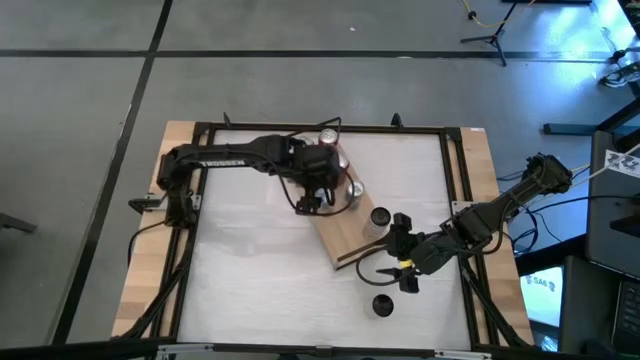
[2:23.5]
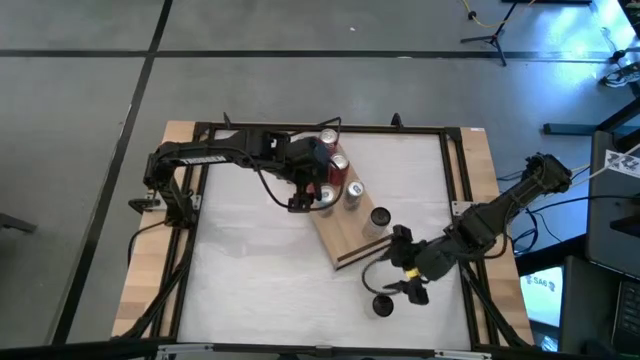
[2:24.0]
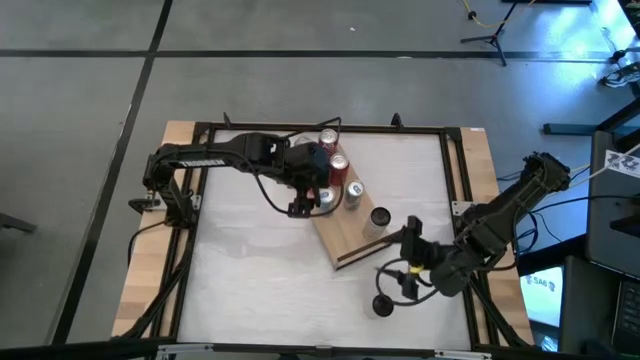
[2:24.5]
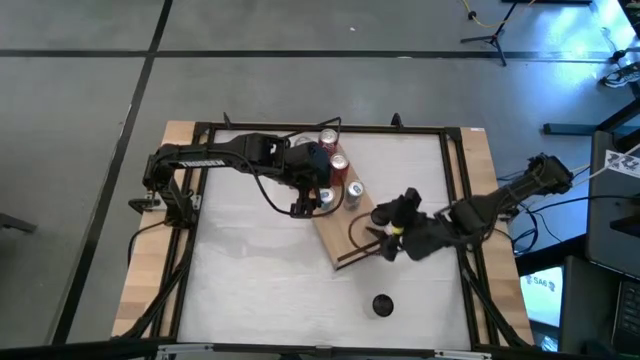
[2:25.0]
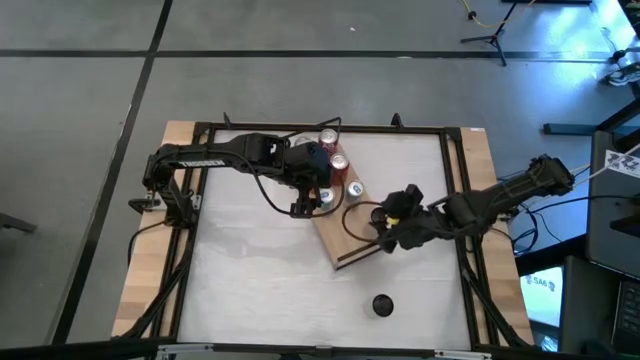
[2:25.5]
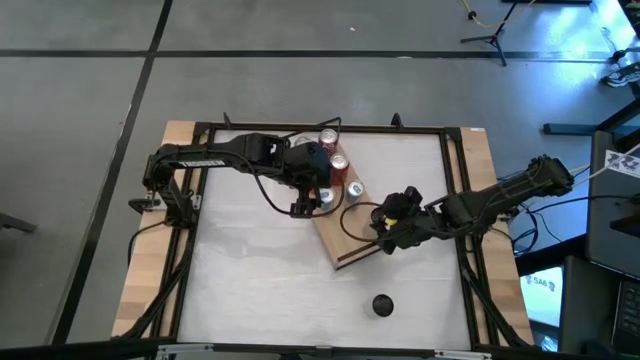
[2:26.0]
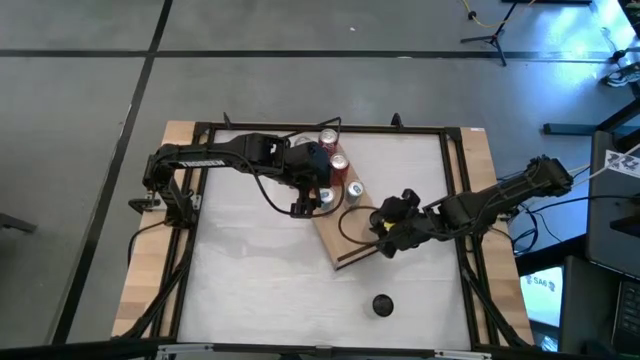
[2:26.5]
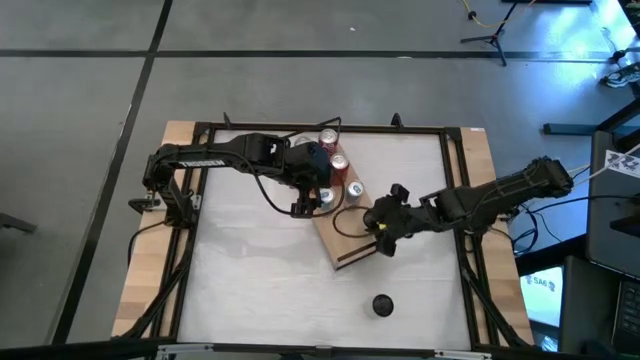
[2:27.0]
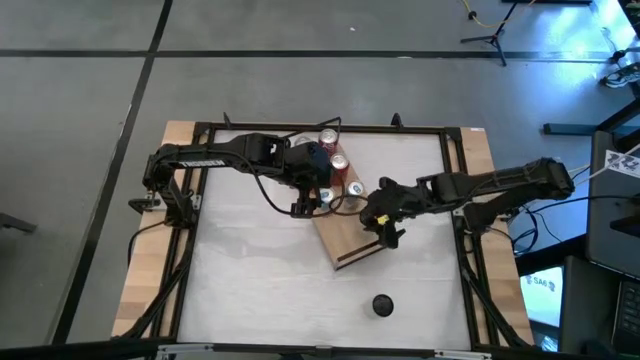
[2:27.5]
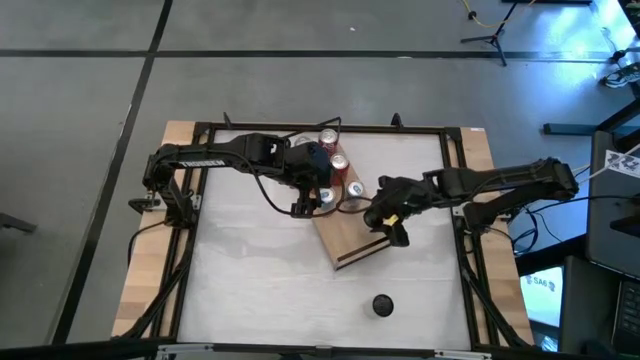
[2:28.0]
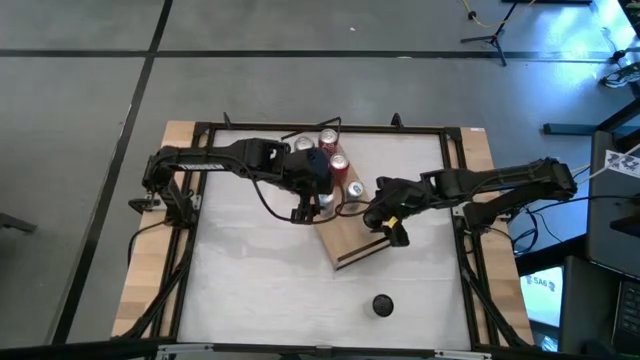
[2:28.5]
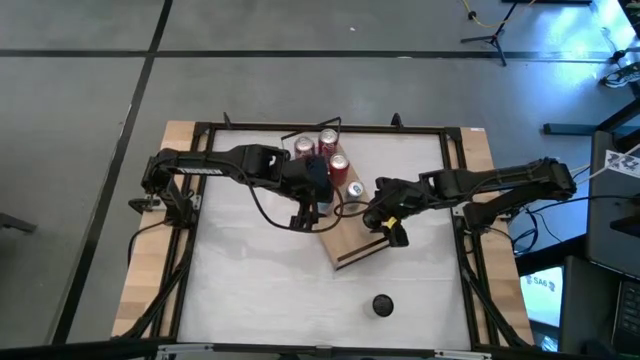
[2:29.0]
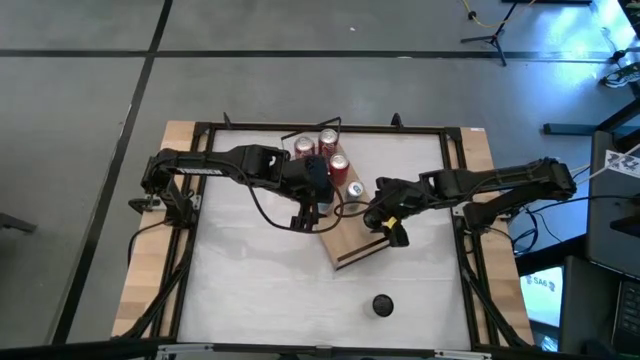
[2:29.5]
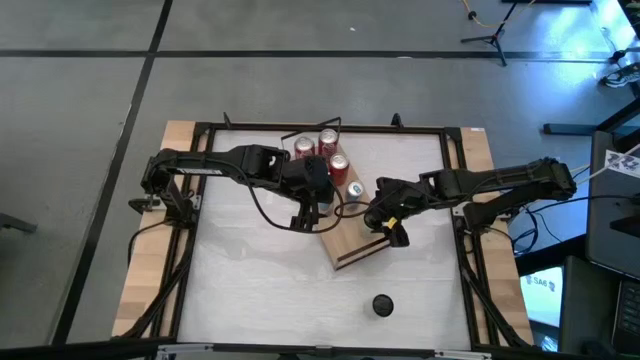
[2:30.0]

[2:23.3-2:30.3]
Task: Place canned beverage on shelf
Adjust the white yellow soda can on the shelf

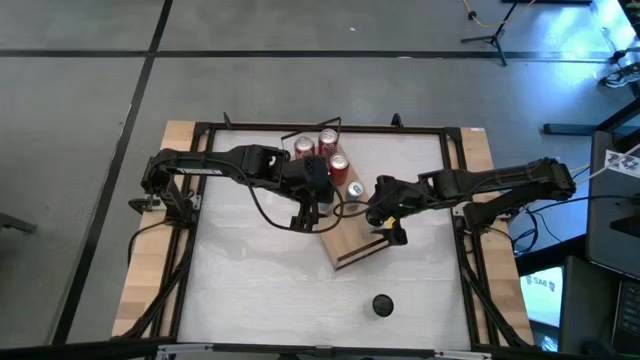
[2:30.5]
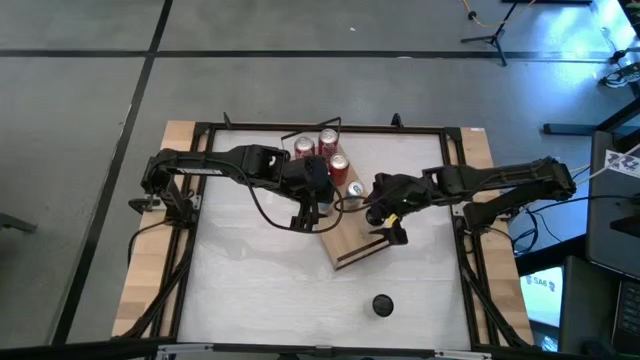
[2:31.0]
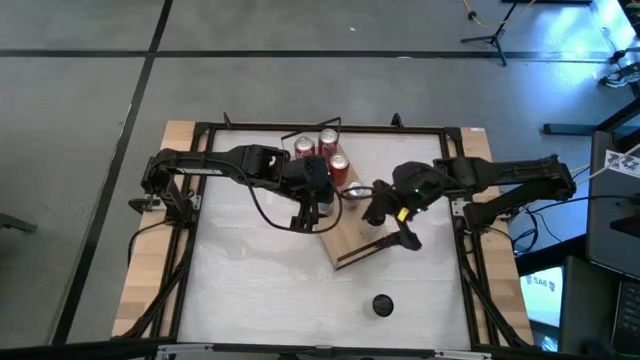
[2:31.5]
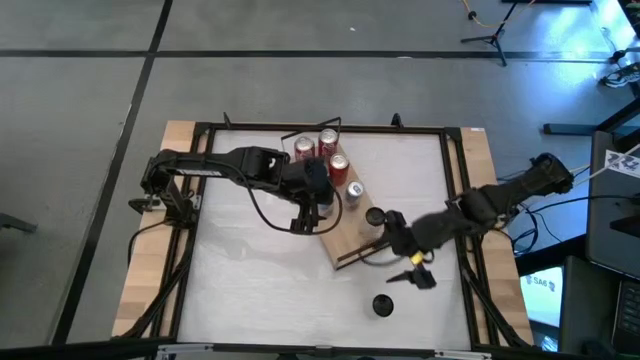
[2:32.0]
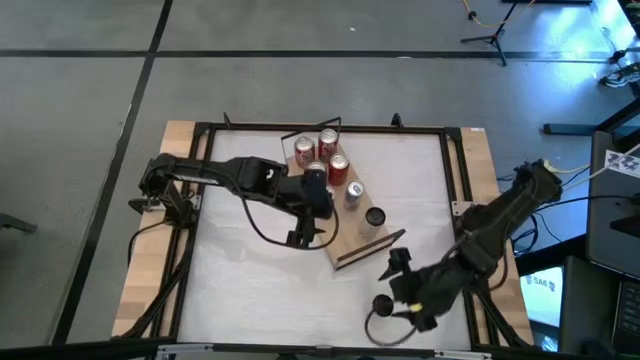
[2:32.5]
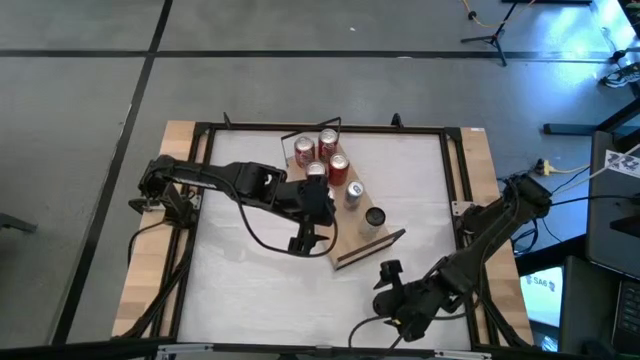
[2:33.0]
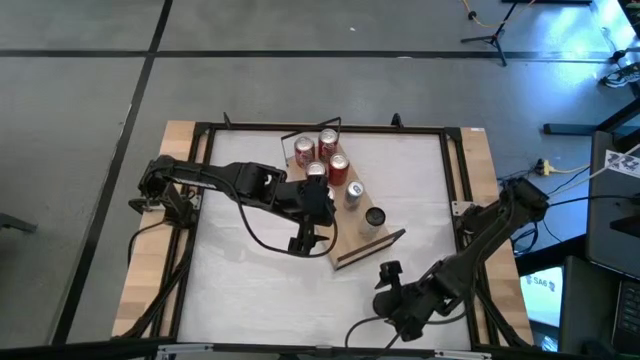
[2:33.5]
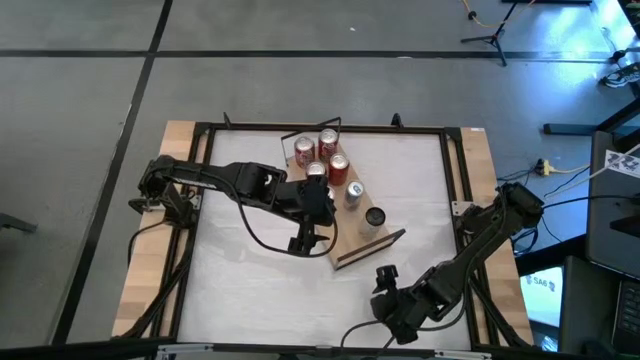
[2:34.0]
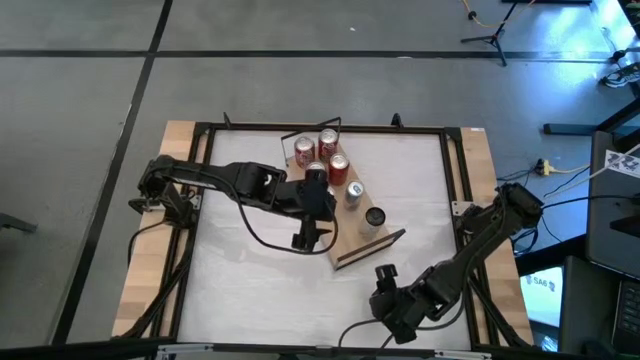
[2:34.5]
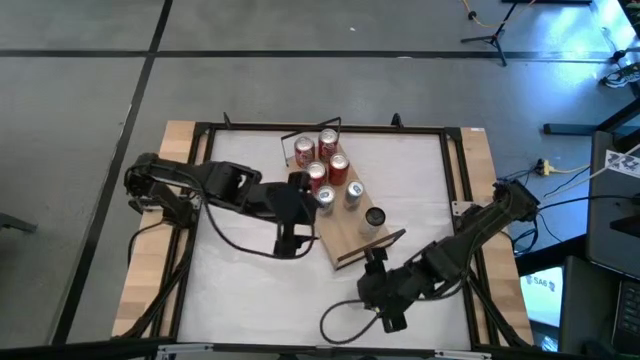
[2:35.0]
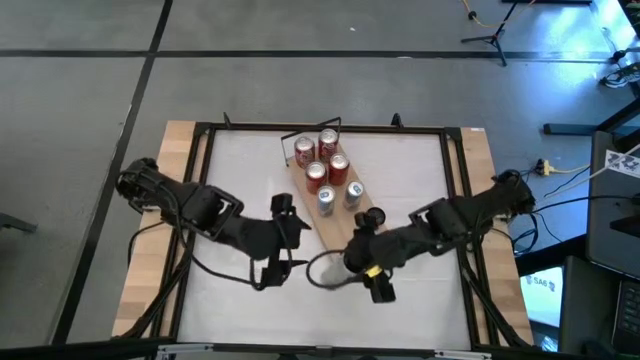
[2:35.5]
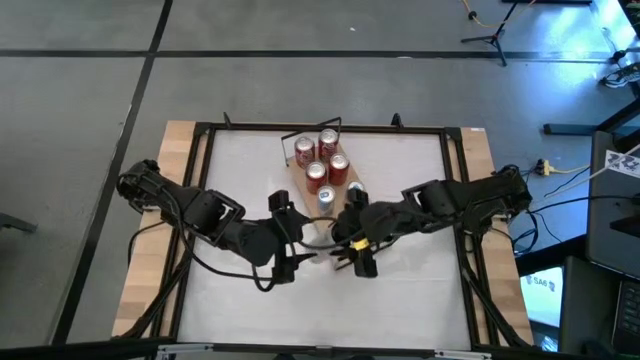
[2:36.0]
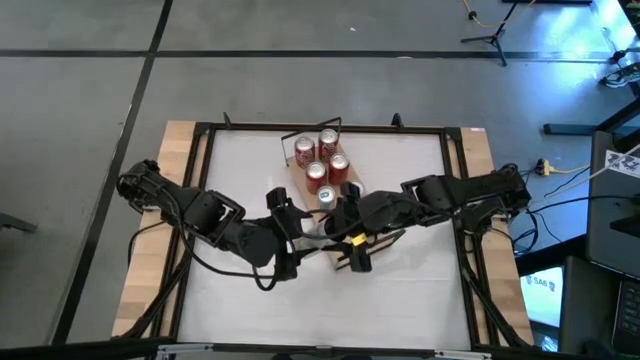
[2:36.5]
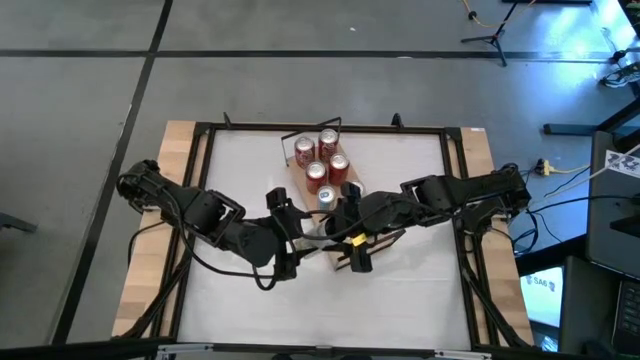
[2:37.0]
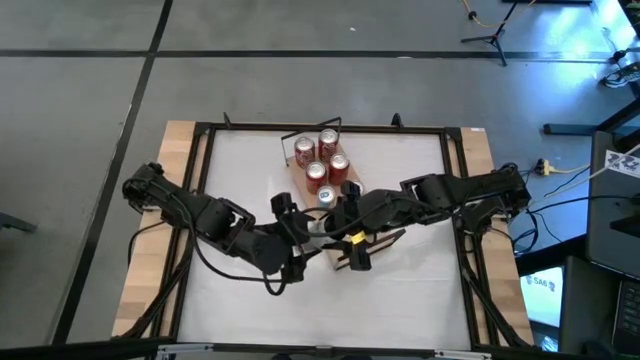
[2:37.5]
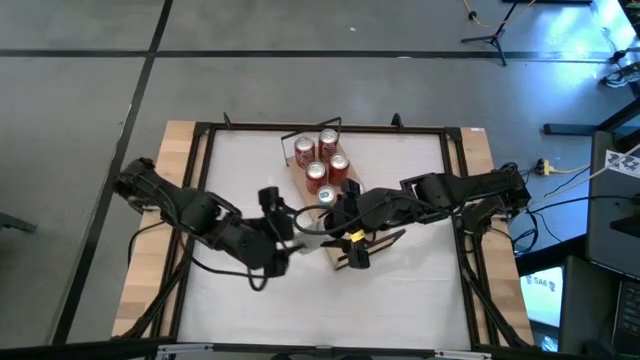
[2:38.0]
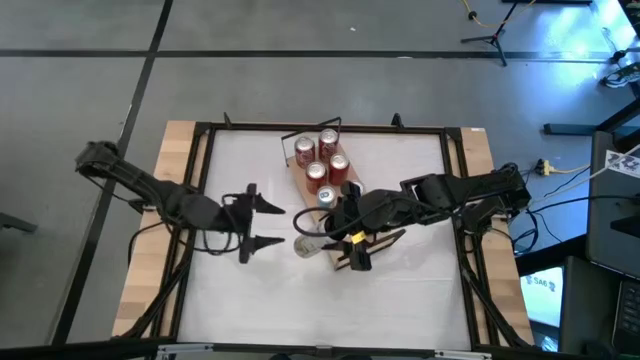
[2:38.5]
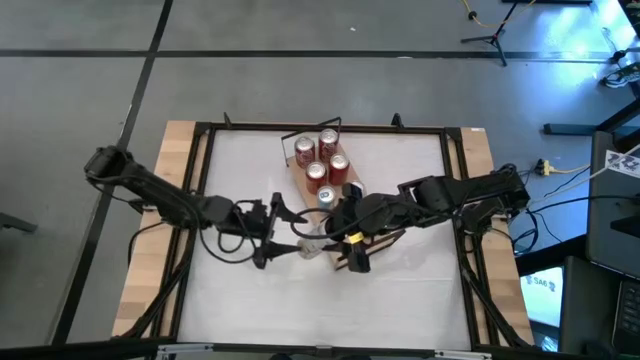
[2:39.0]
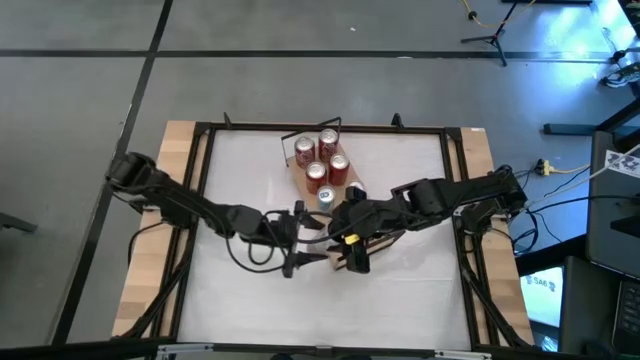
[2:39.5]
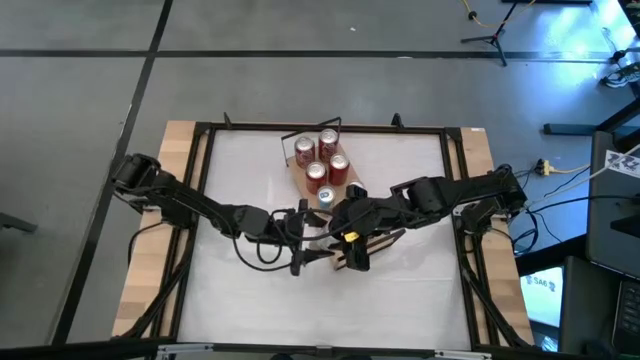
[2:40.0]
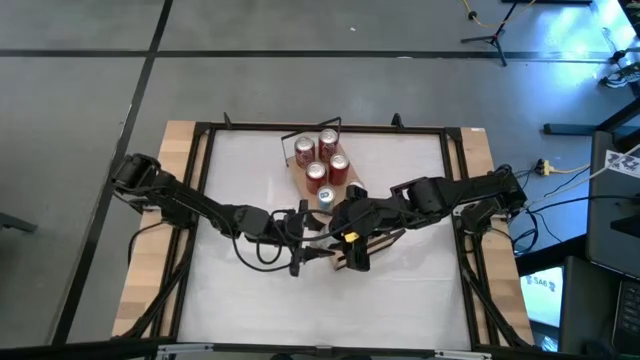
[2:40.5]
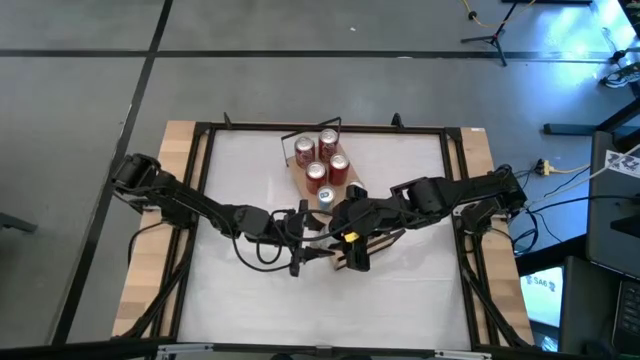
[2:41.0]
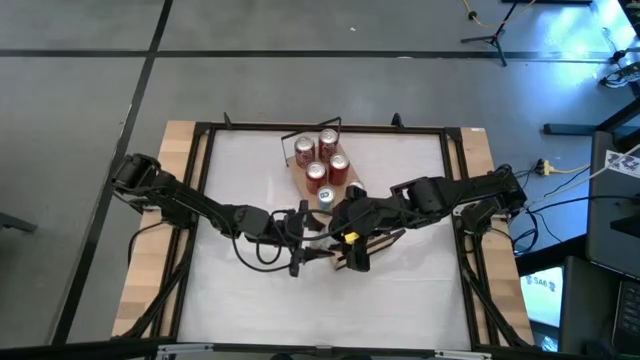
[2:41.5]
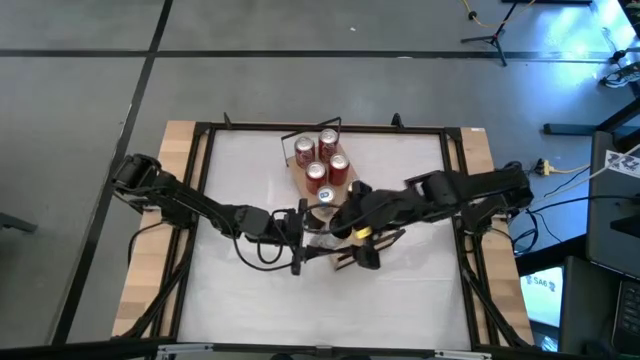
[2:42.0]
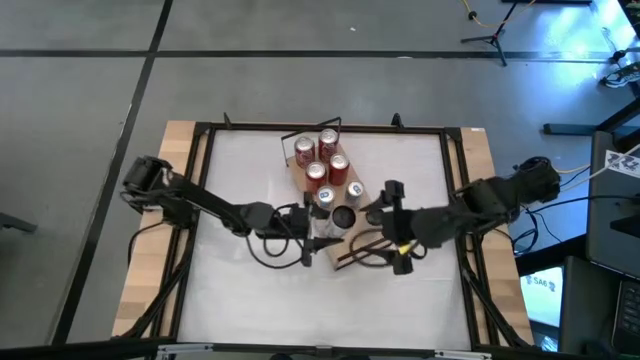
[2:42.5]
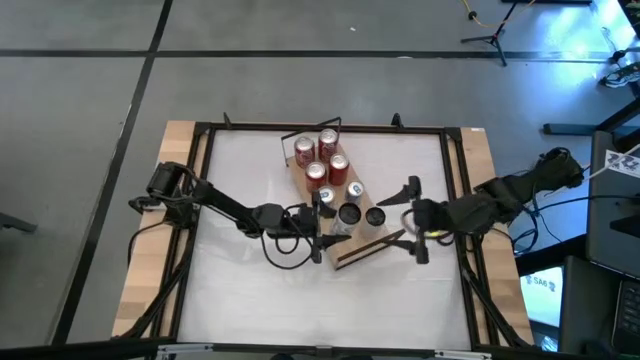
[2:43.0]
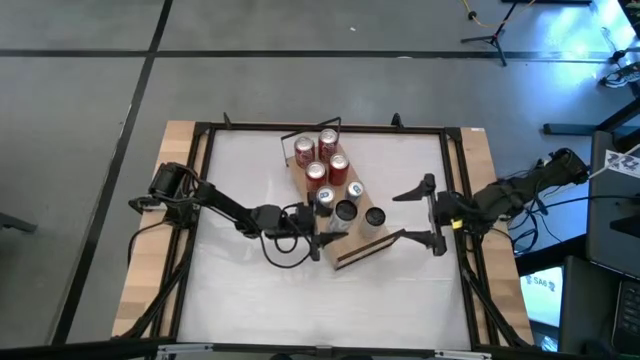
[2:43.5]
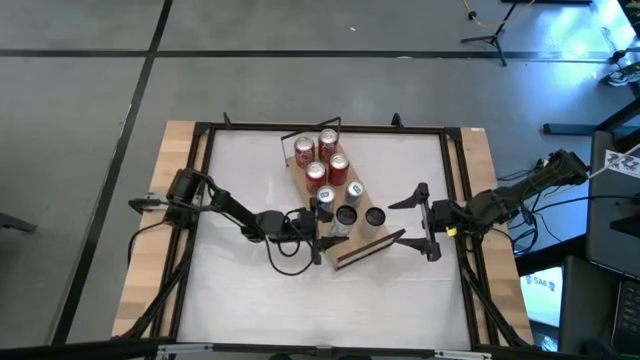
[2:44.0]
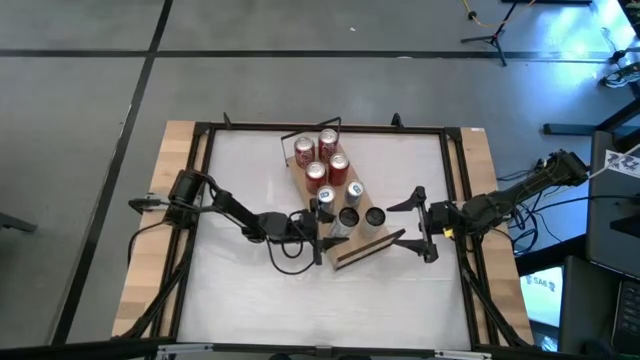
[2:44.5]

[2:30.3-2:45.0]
Put the white yellow soda can on the shelf aligned with the other white yellow soda can

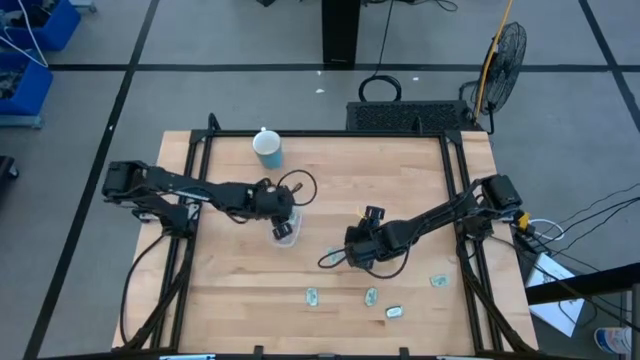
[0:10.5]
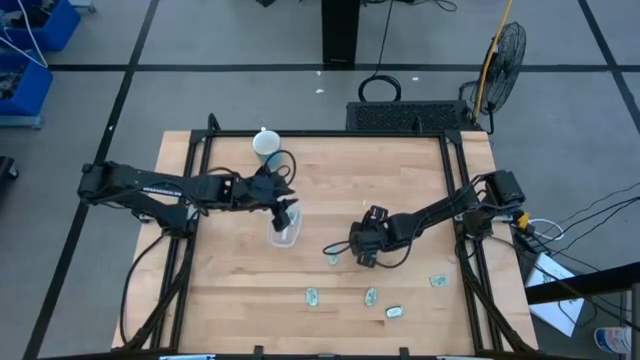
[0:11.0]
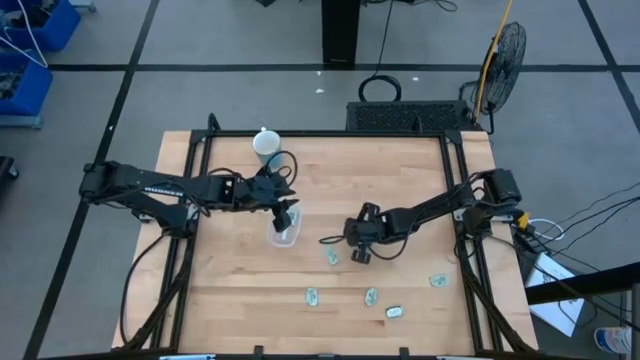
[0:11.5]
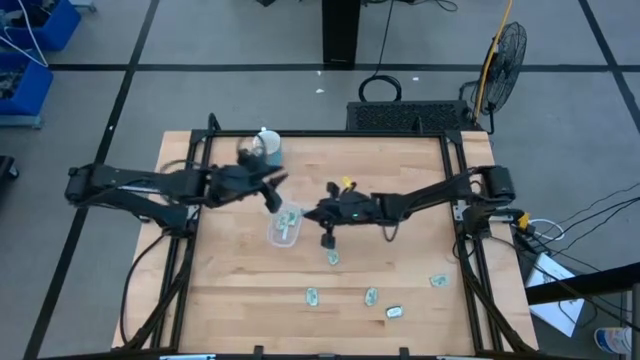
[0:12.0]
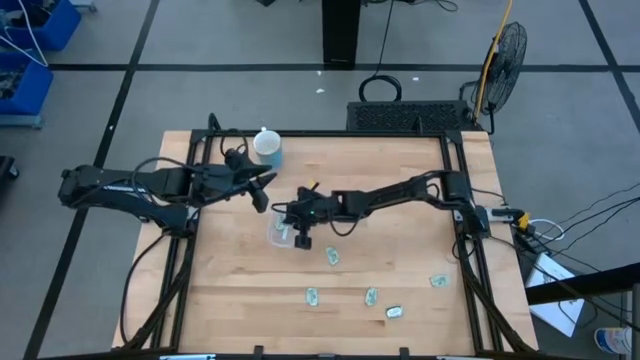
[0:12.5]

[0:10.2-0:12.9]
Task: Pick and place Stevia / Truvia into bins
Put the light green stevia packet into the transparent container
